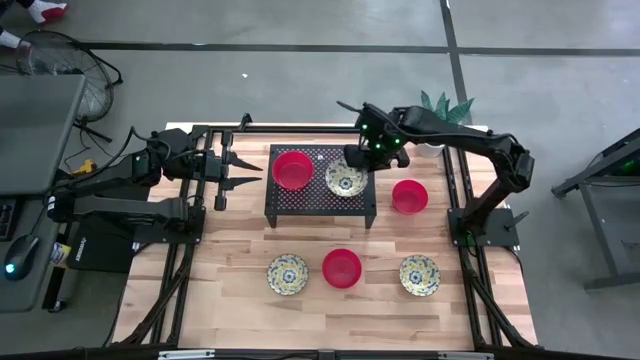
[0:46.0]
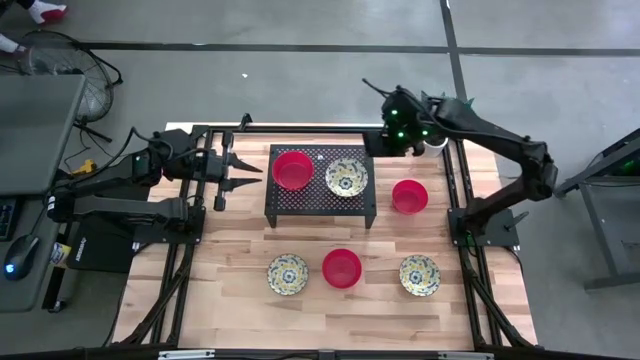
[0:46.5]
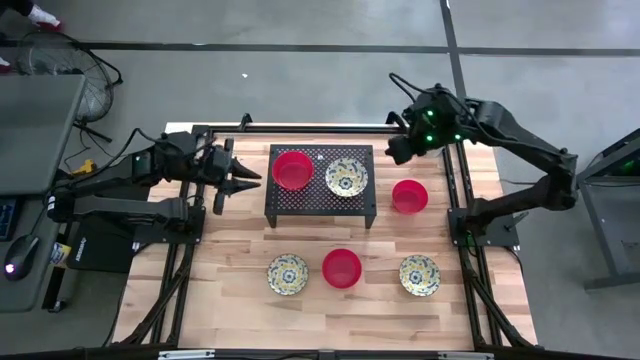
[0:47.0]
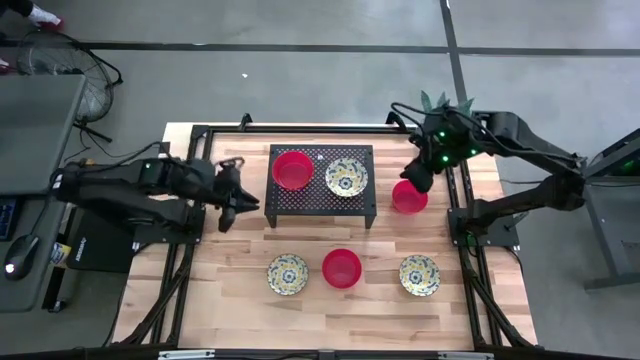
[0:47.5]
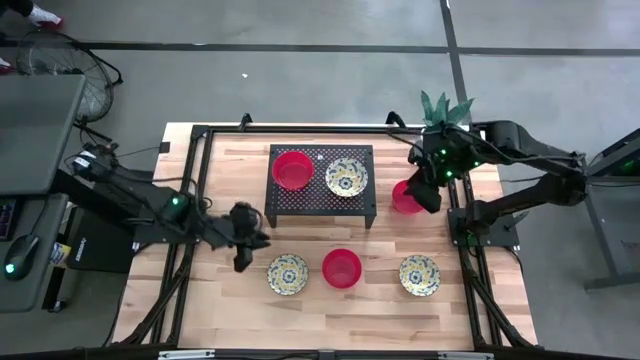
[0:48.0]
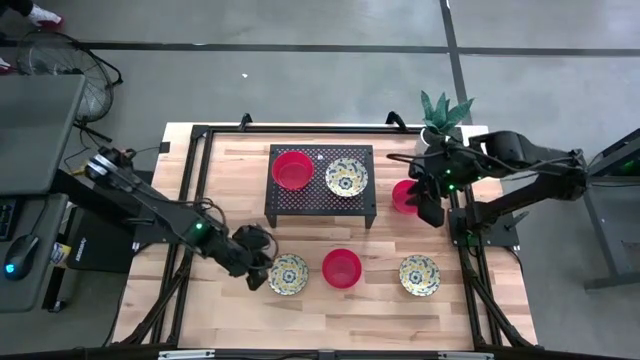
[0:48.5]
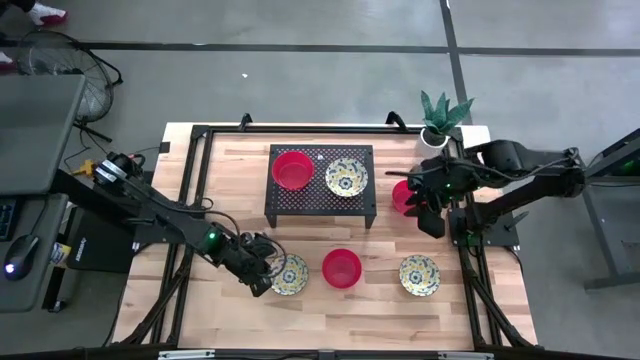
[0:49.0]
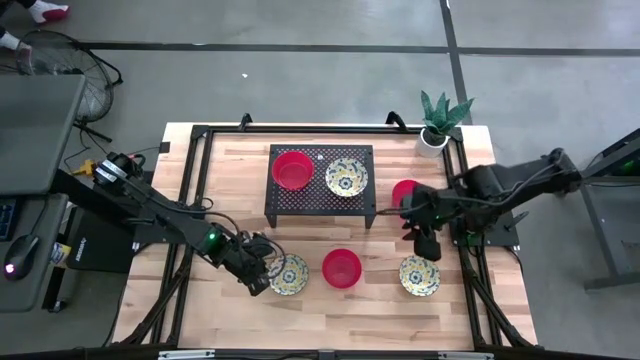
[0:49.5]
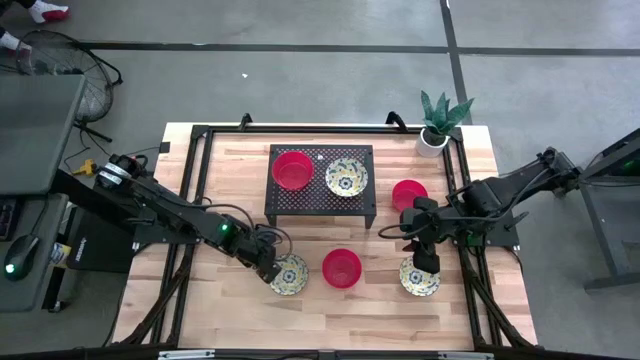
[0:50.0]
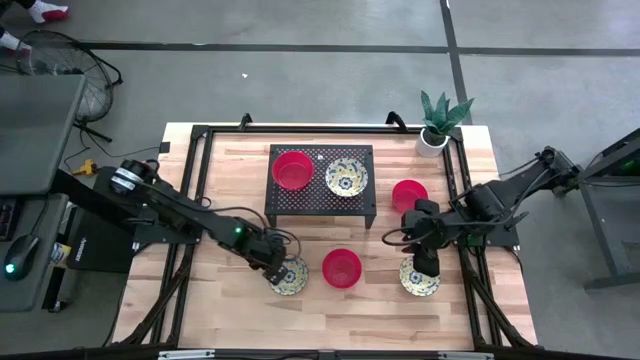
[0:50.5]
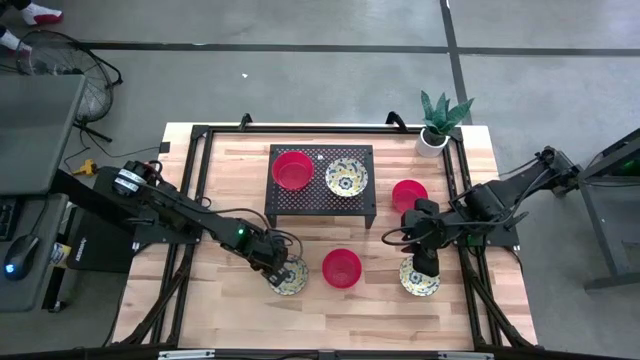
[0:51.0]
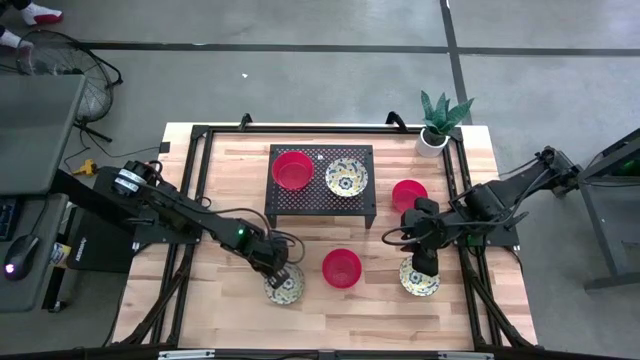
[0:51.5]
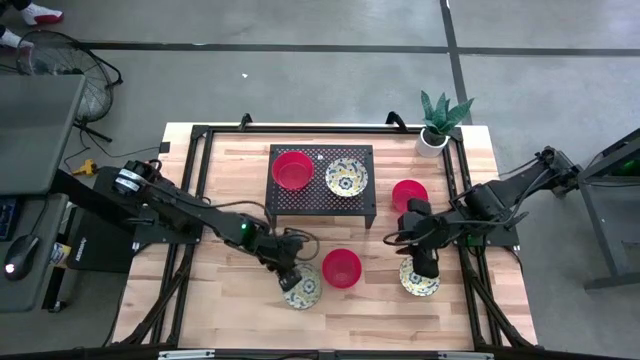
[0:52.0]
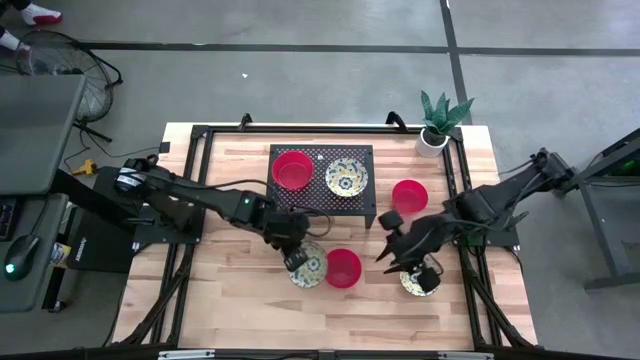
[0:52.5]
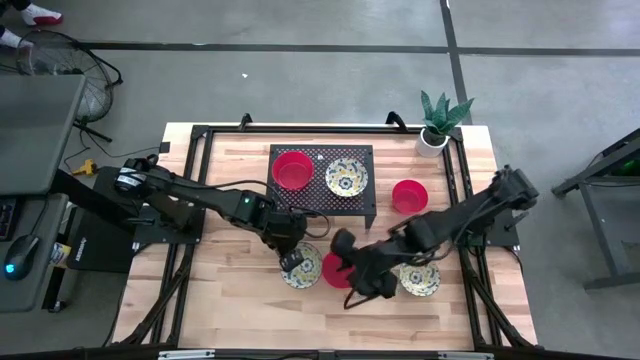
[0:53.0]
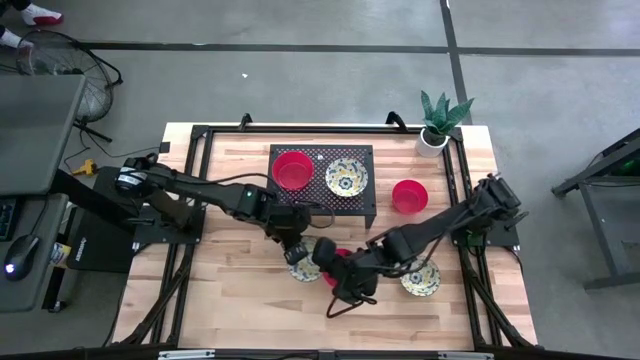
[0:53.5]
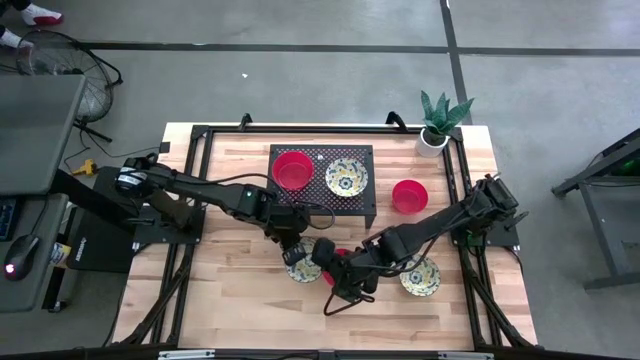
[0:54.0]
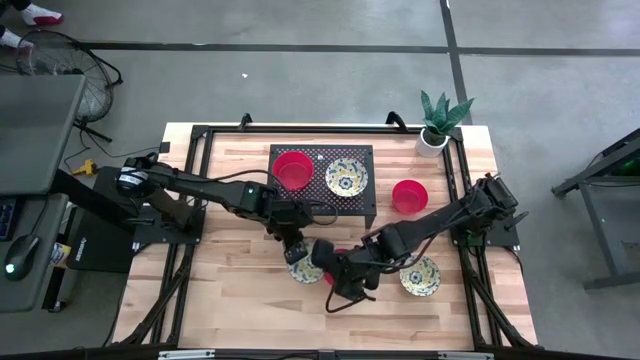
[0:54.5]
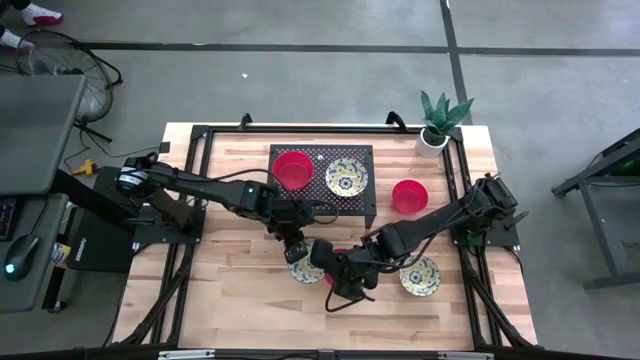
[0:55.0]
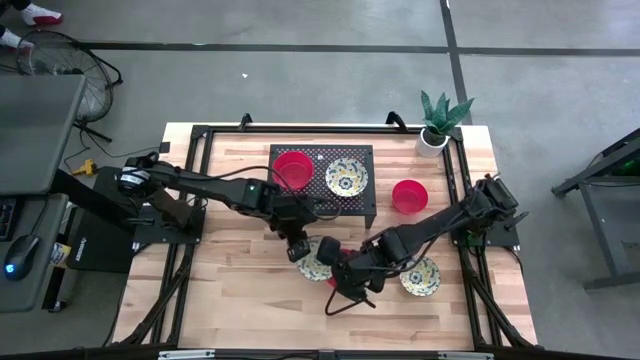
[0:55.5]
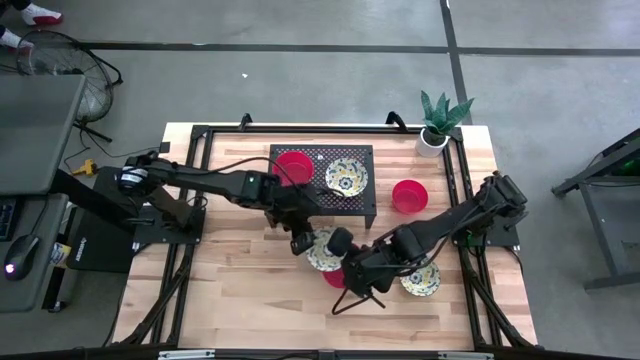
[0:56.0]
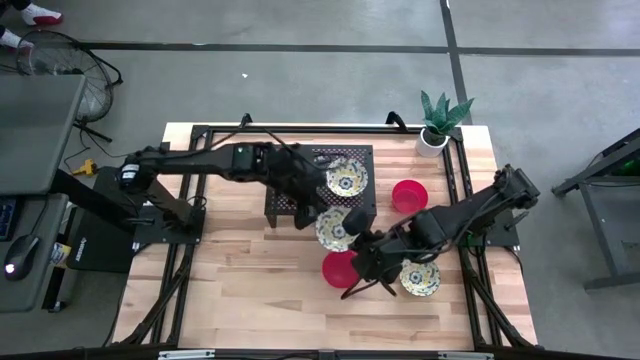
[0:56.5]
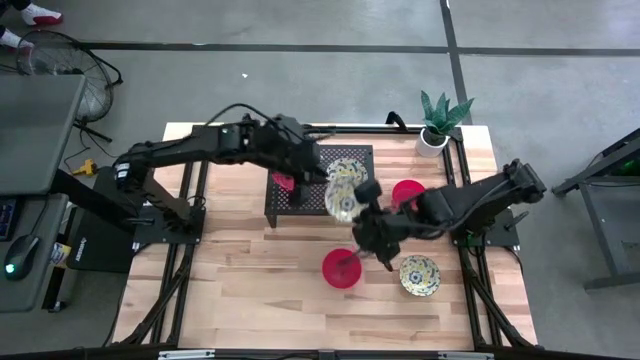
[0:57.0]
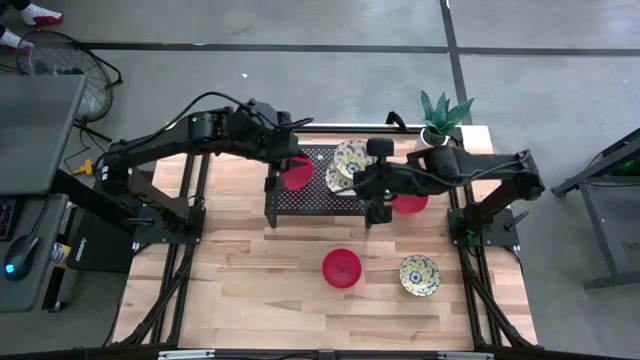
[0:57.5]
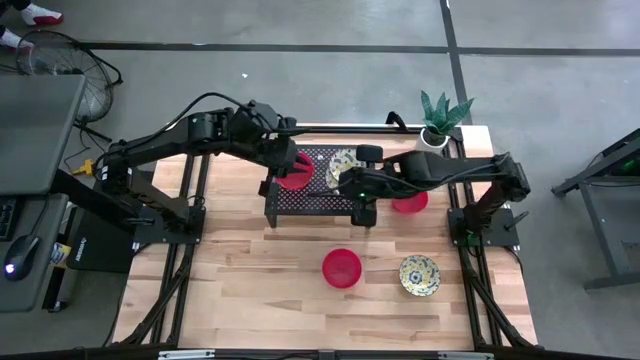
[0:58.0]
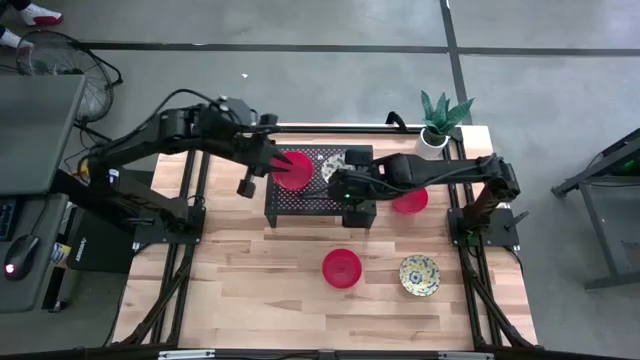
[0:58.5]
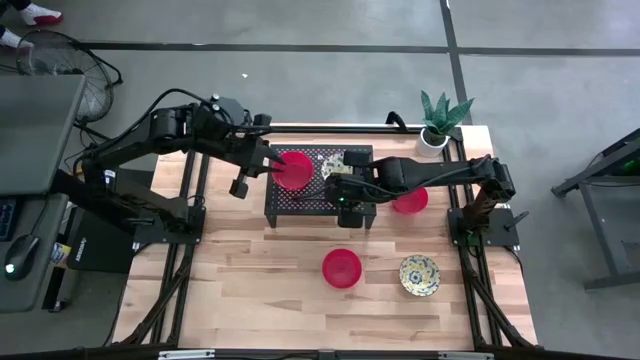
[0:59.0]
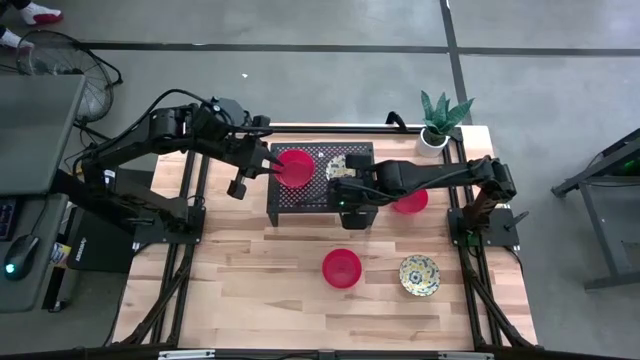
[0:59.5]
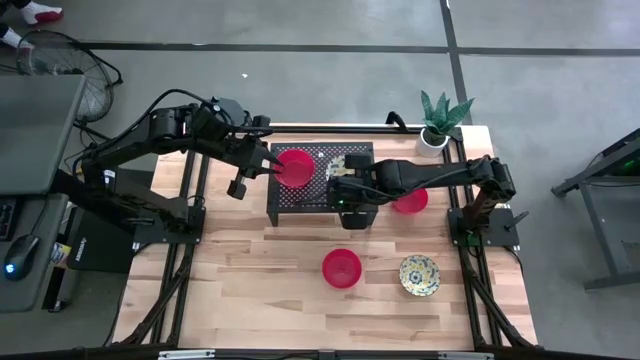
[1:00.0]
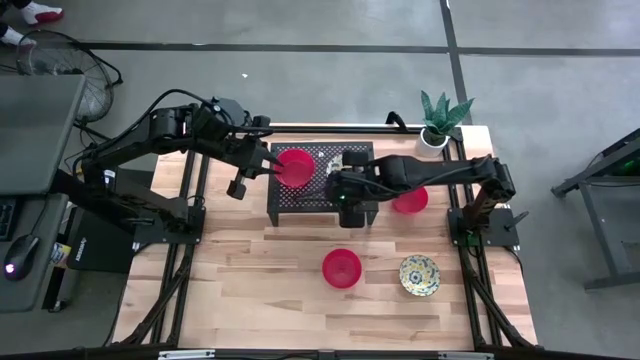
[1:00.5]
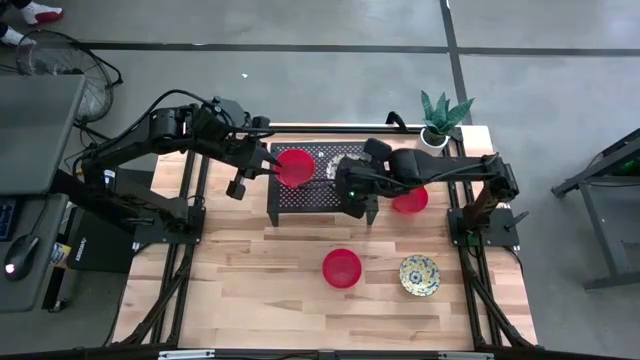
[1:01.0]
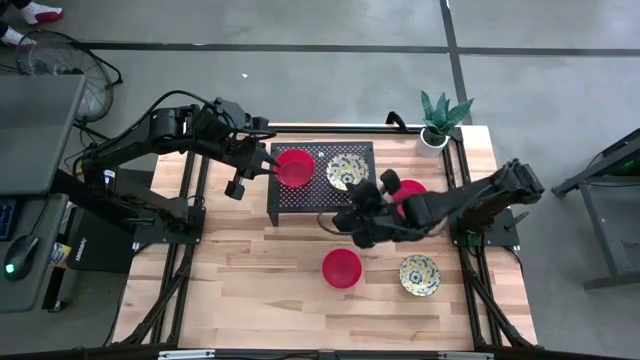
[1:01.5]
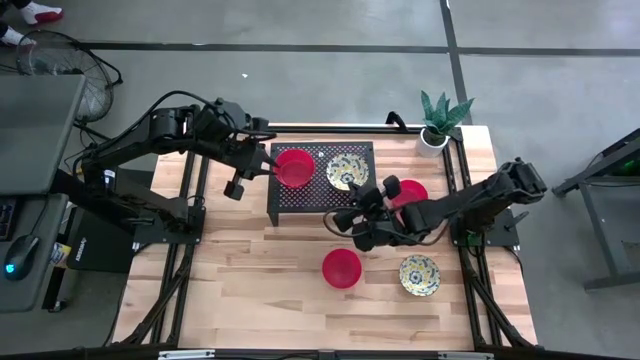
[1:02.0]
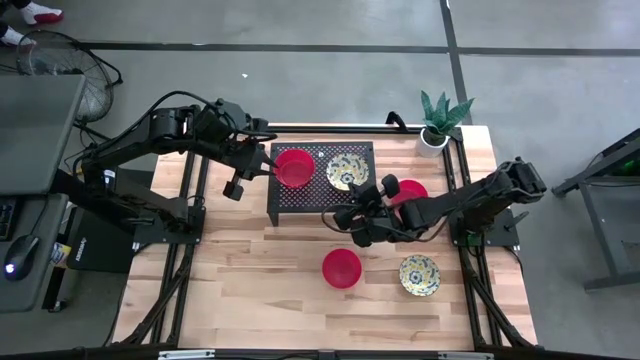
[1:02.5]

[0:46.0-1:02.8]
Task: Pick & Place Mini bowls
Stack the left yellow patterned bowl on top of the yellow patterned bowl on the shelf

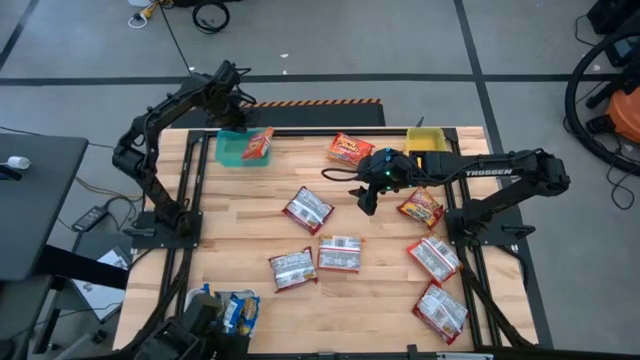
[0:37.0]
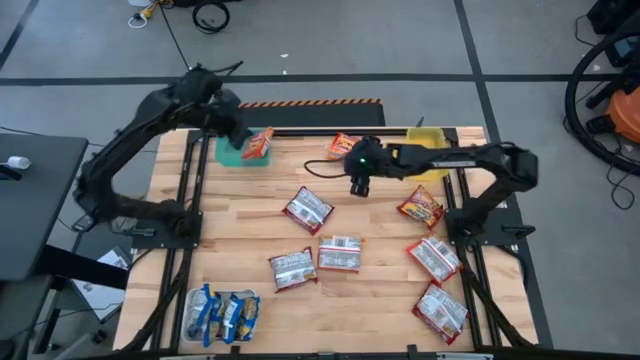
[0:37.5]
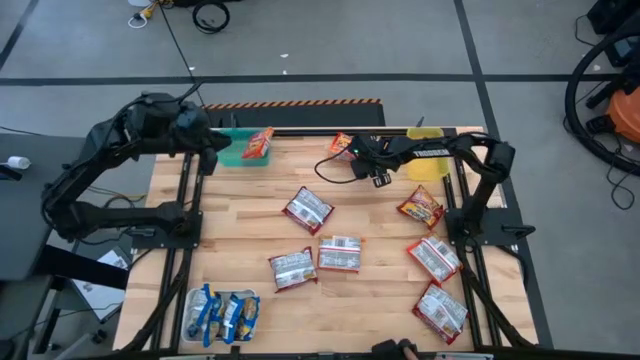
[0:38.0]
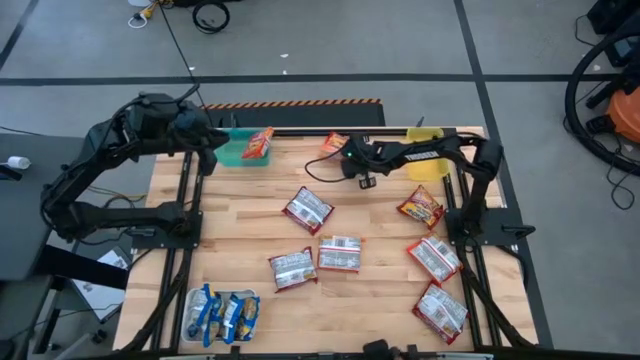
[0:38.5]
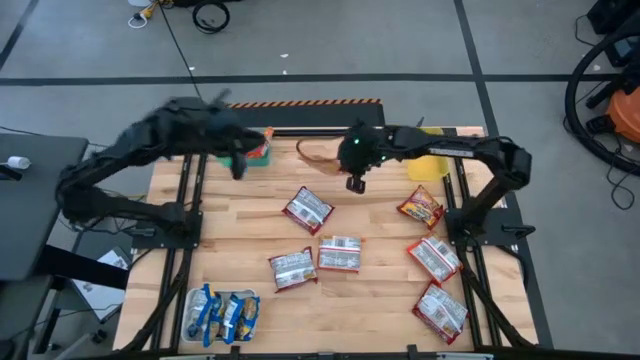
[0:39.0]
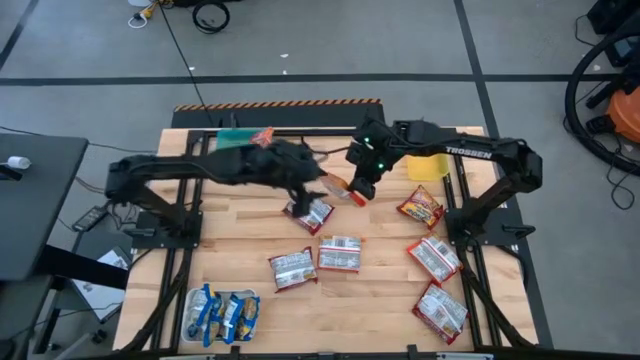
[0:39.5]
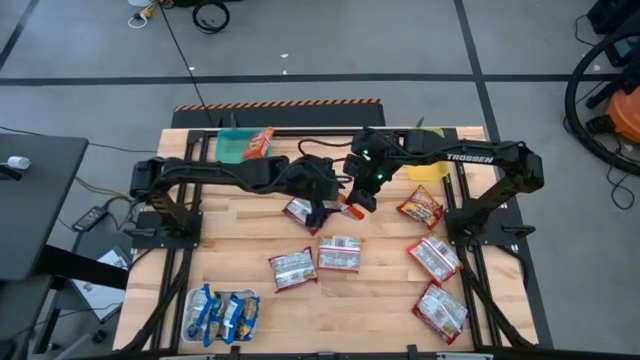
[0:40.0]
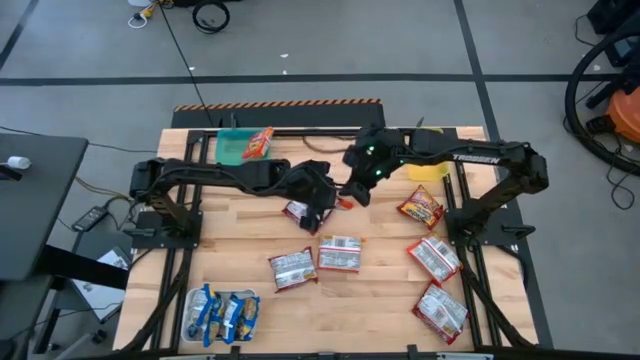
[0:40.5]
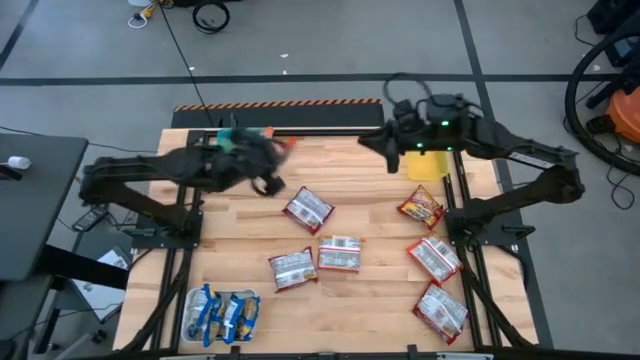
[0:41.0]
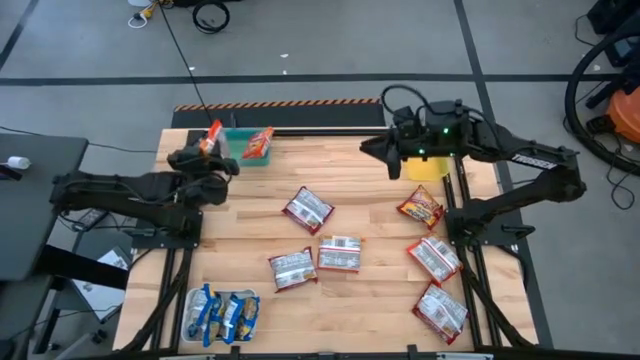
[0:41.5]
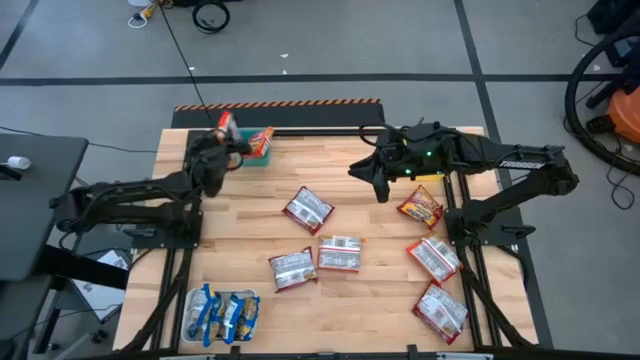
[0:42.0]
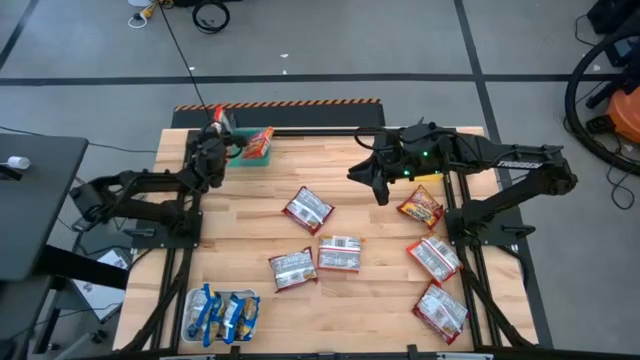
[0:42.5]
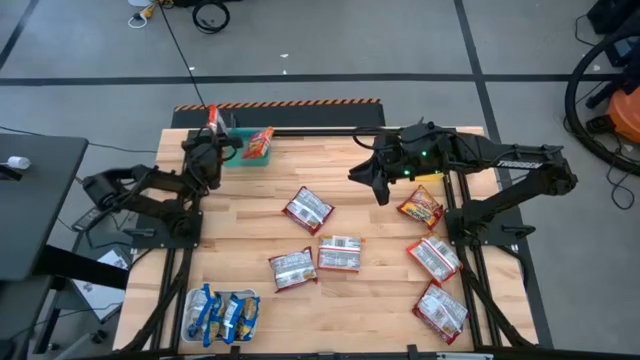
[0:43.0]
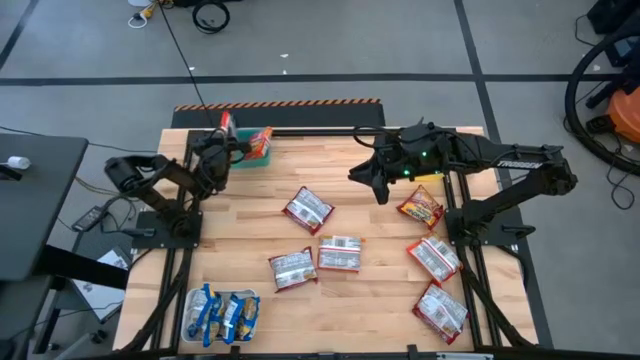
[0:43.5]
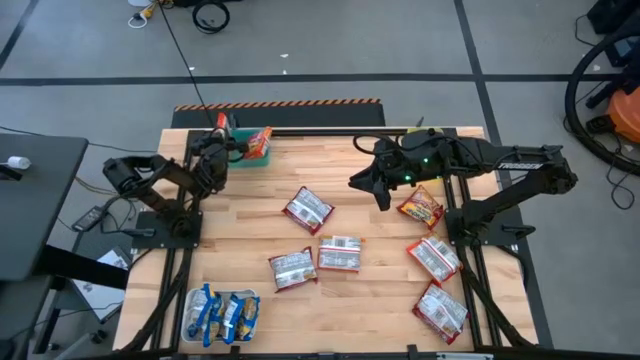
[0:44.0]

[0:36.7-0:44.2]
Task: Sort Maruchan noodles
Put the orange noodle pack into the green bin
